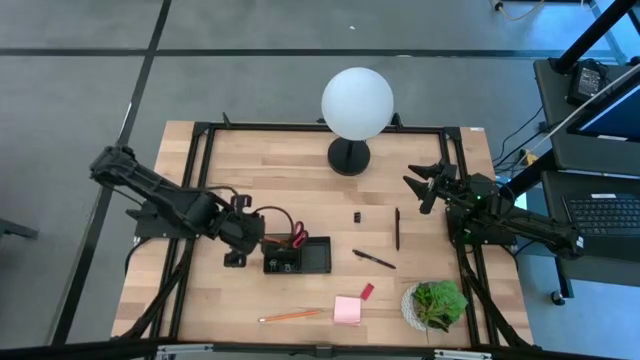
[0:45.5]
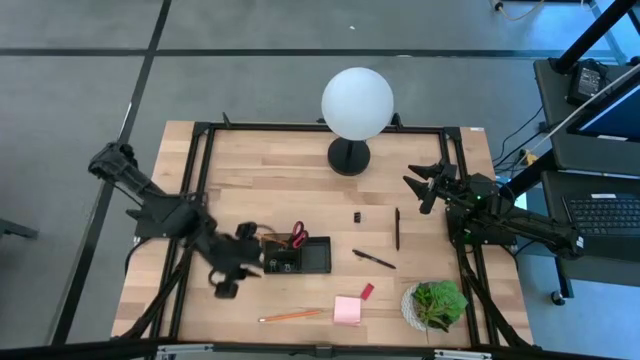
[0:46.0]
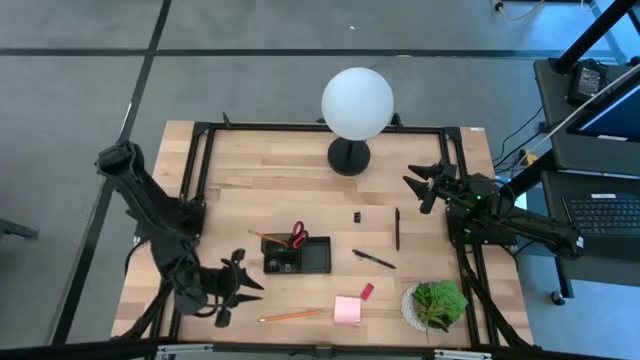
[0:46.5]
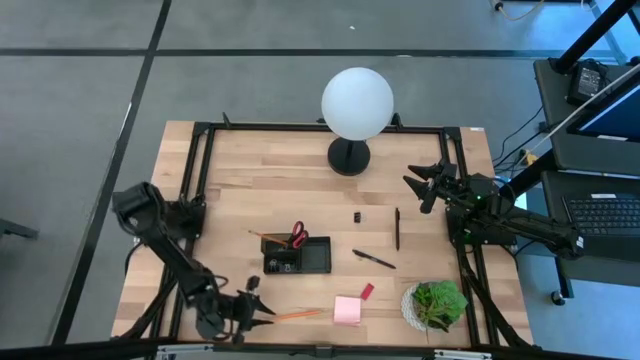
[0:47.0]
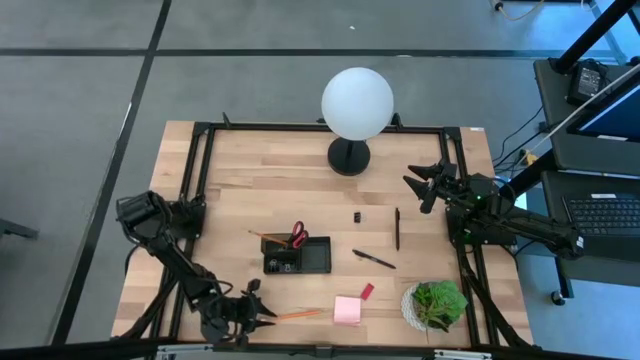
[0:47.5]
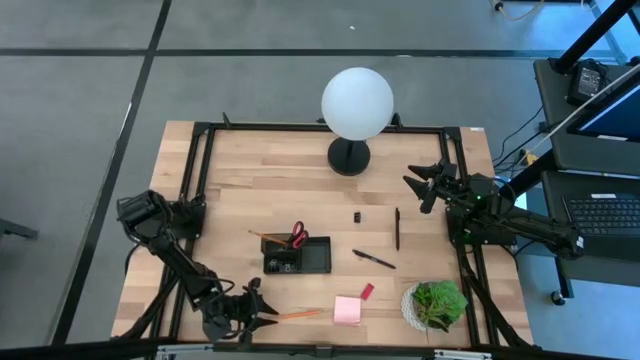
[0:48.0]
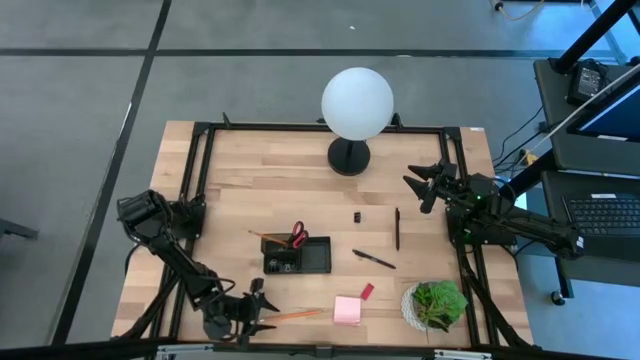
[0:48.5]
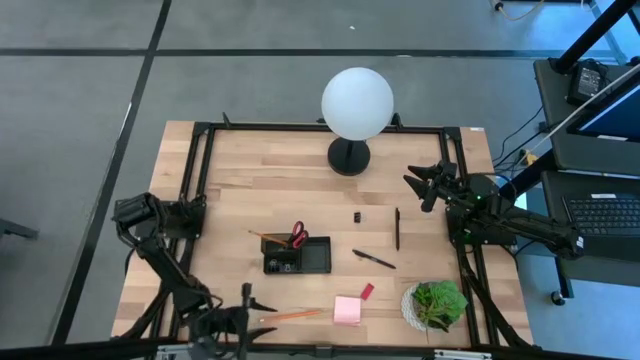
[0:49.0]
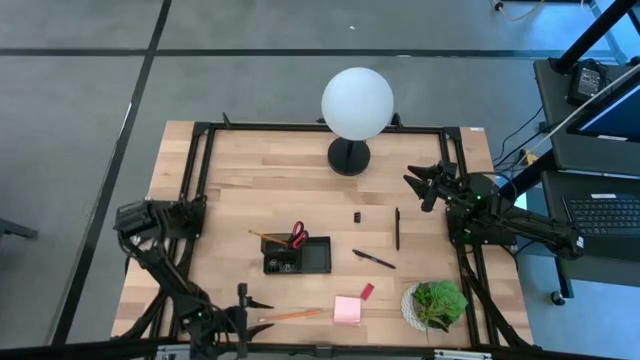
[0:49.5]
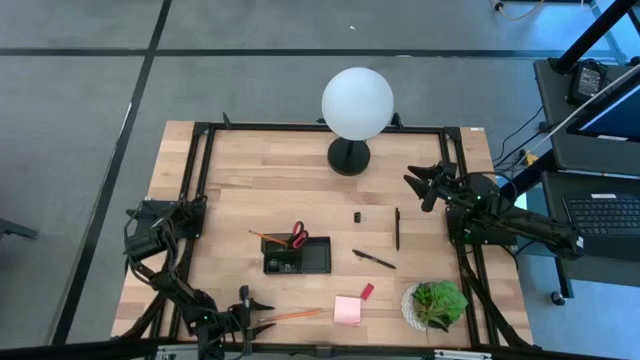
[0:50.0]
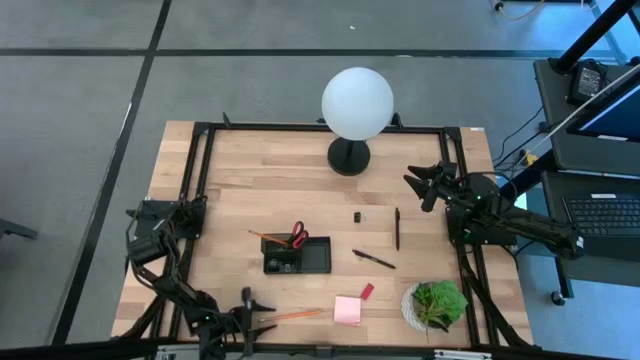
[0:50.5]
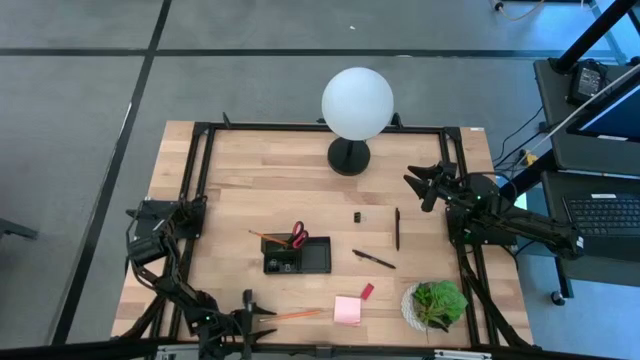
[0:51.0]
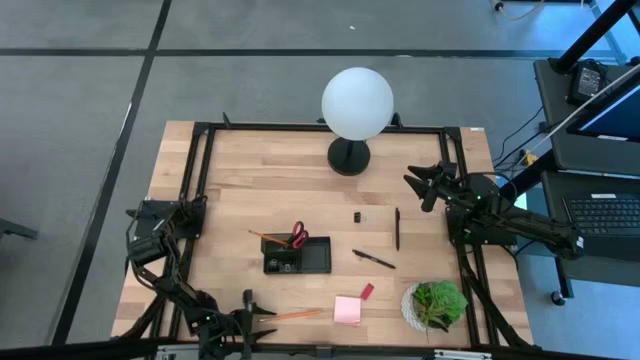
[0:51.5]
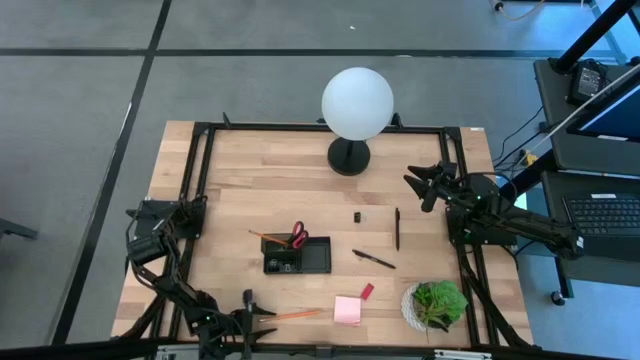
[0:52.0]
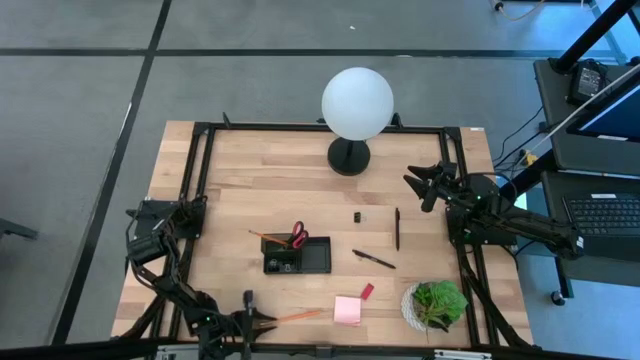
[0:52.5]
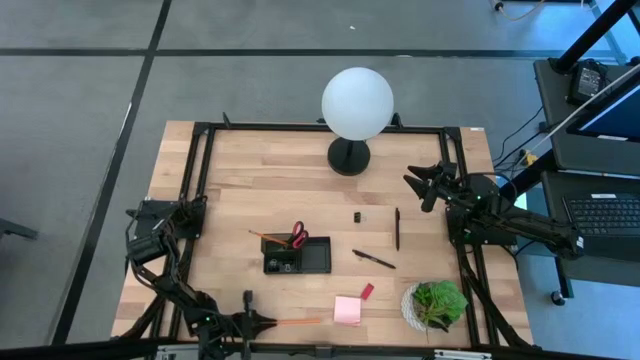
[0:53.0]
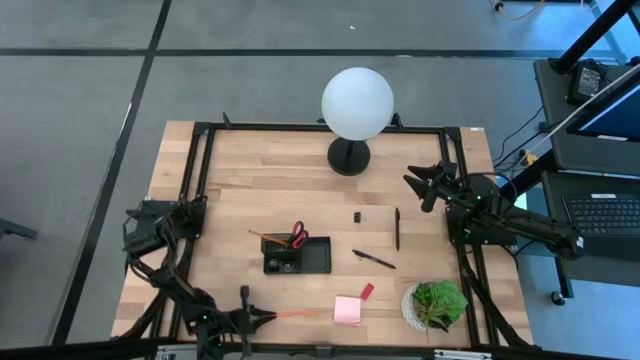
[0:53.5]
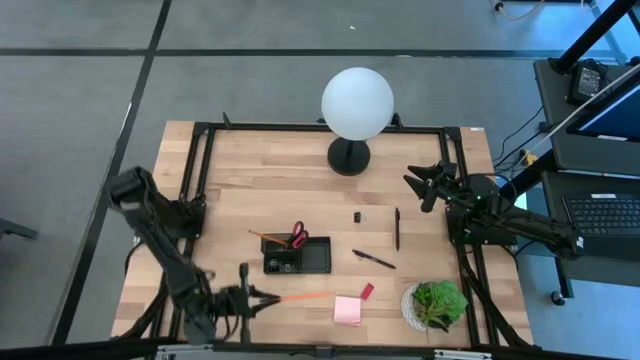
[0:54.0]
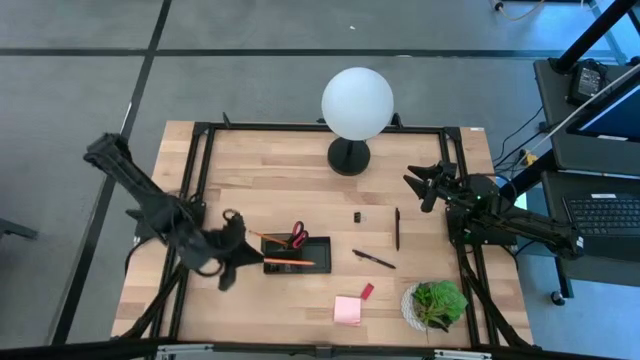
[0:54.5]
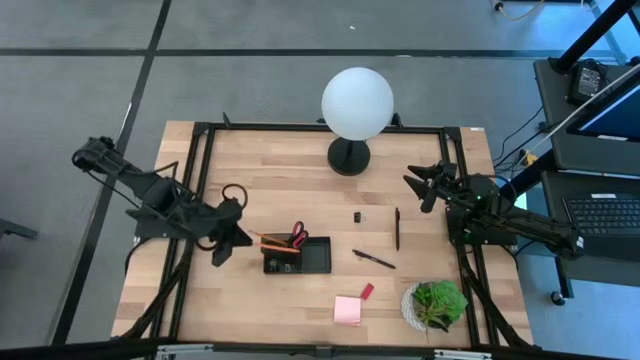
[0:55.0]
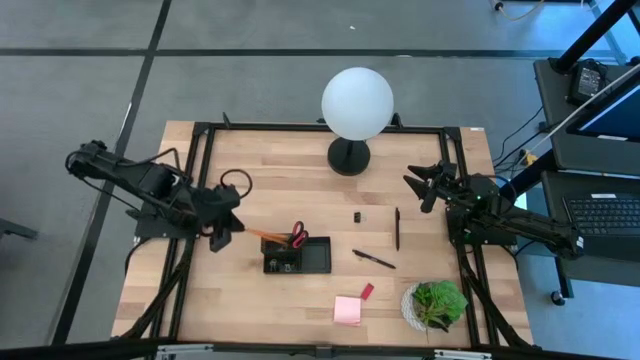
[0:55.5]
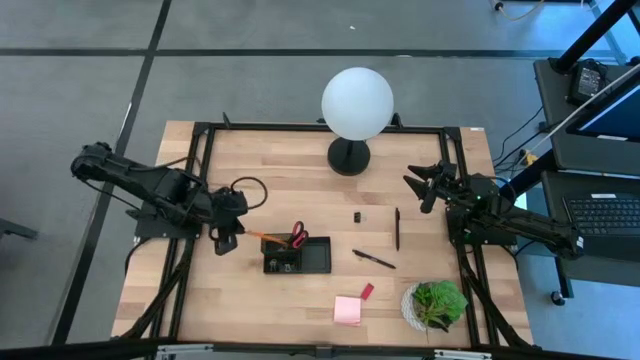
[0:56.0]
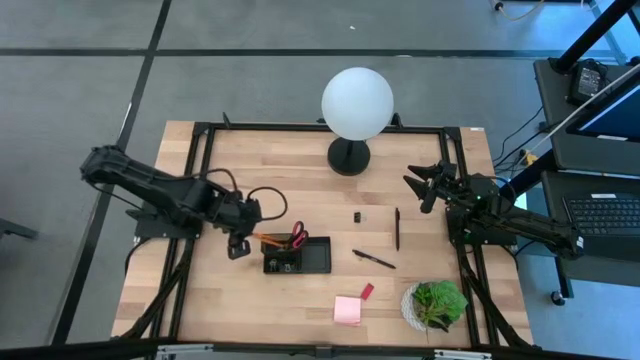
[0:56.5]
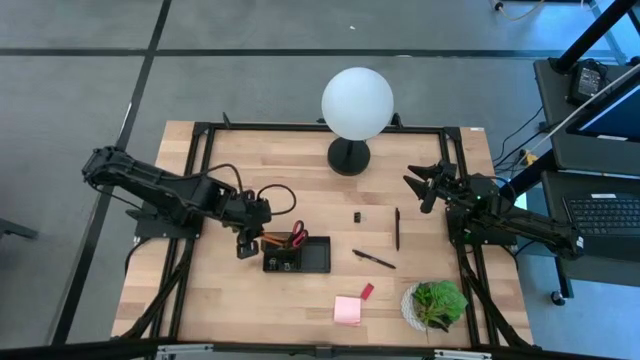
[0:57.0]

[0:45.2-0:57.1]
Task: Pick and place office supplies into organizer
Put the orange pencil into the black desk organizer

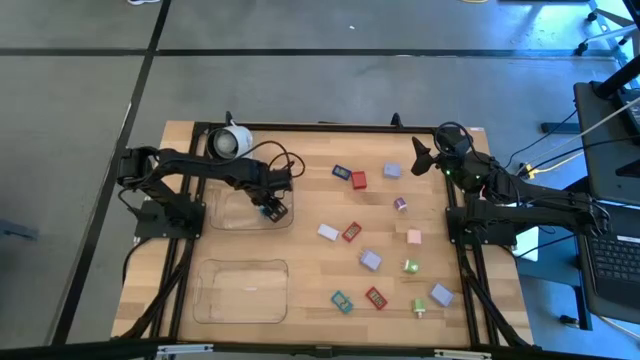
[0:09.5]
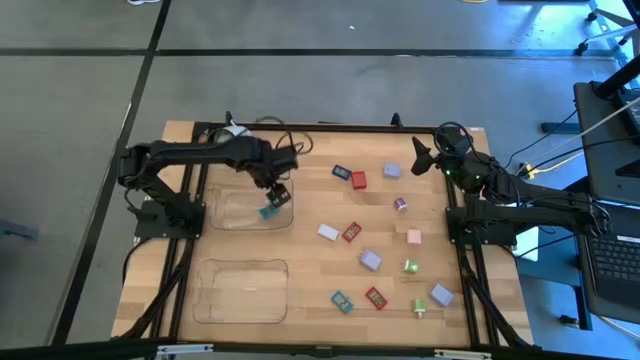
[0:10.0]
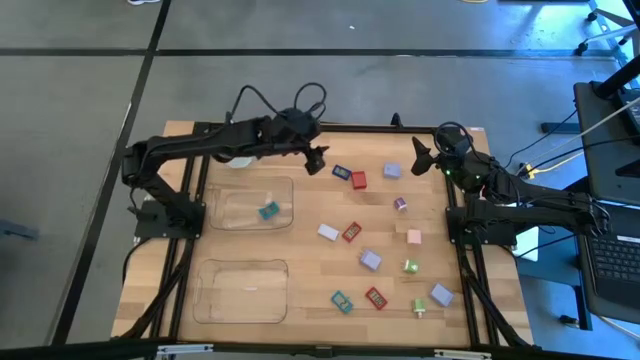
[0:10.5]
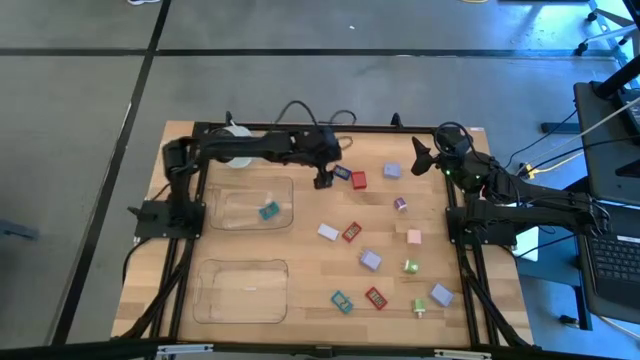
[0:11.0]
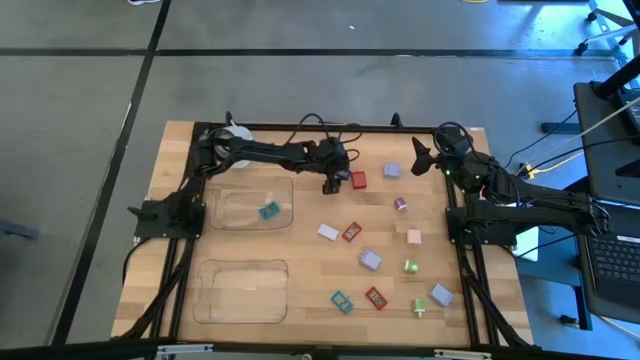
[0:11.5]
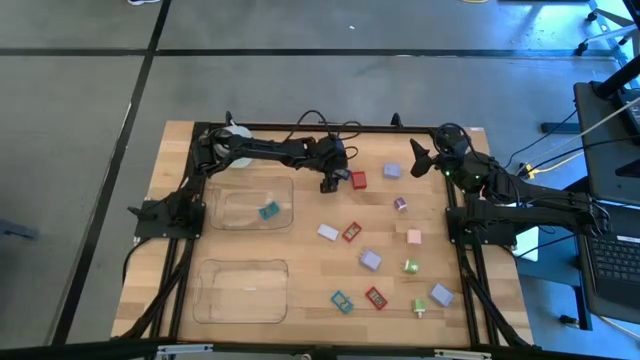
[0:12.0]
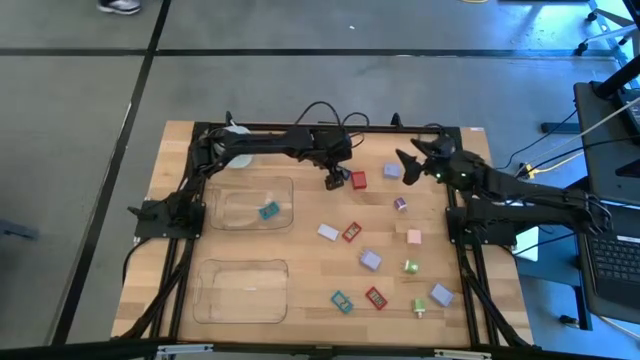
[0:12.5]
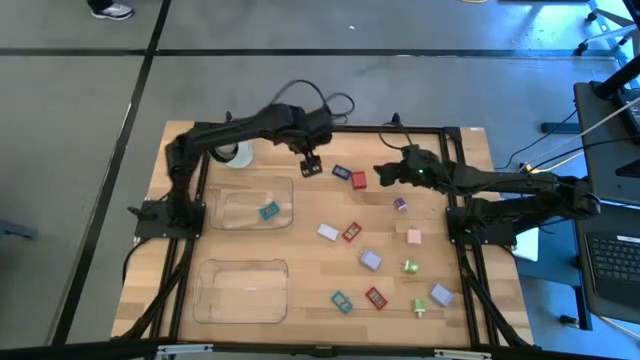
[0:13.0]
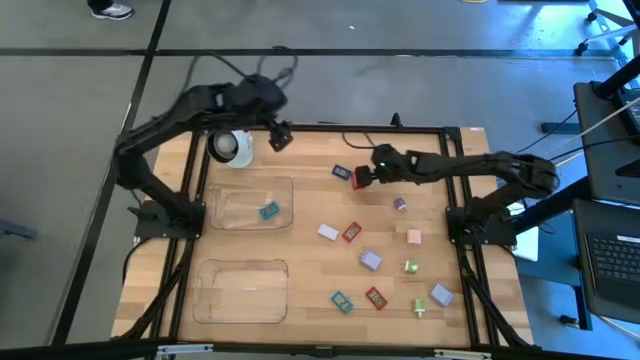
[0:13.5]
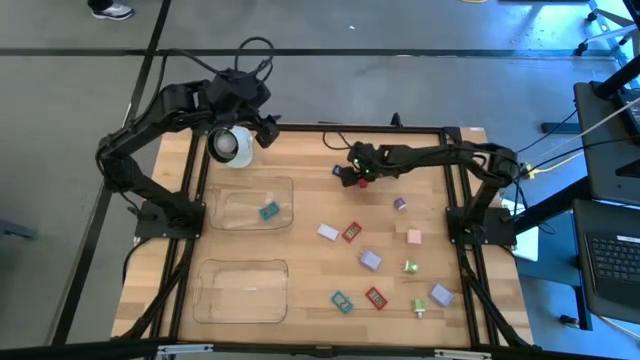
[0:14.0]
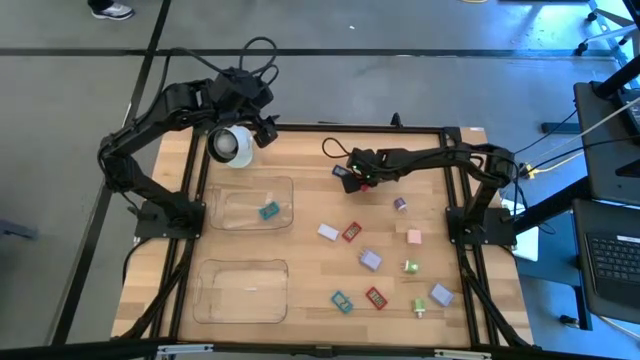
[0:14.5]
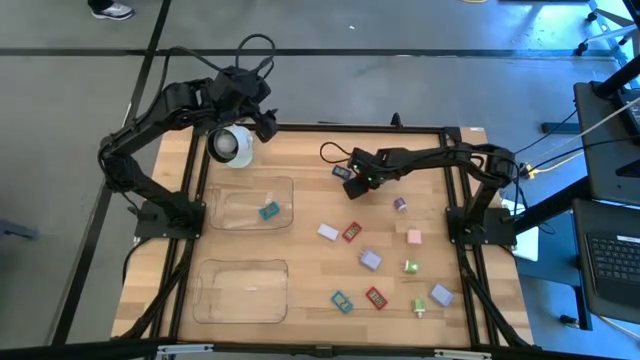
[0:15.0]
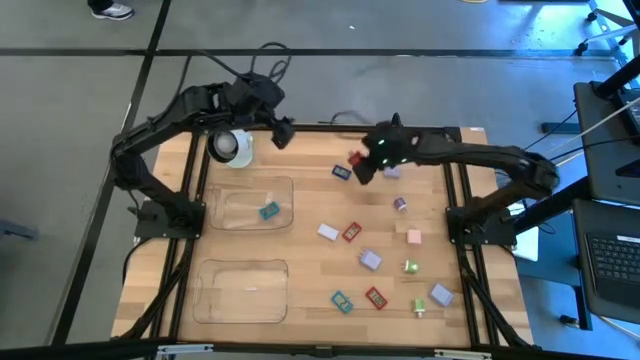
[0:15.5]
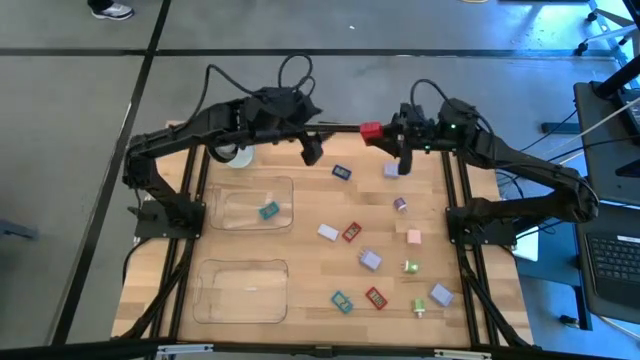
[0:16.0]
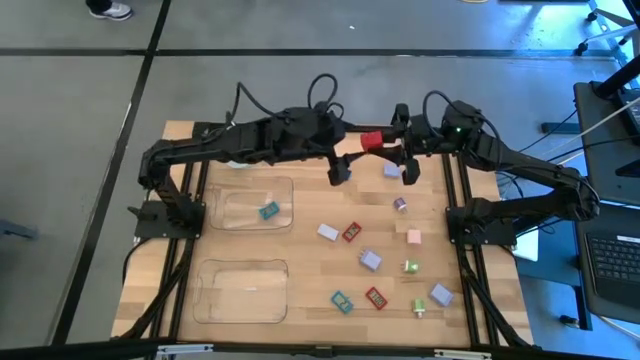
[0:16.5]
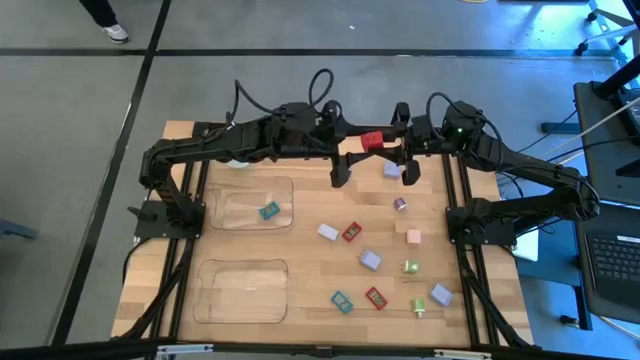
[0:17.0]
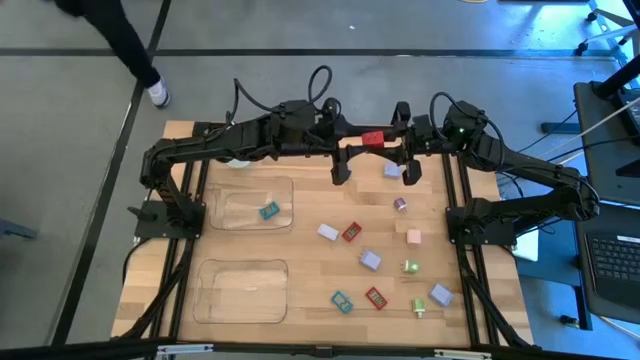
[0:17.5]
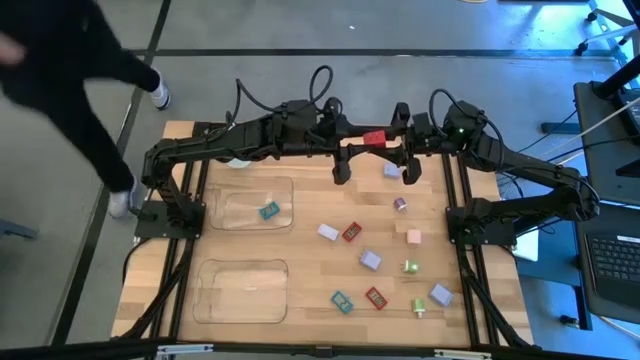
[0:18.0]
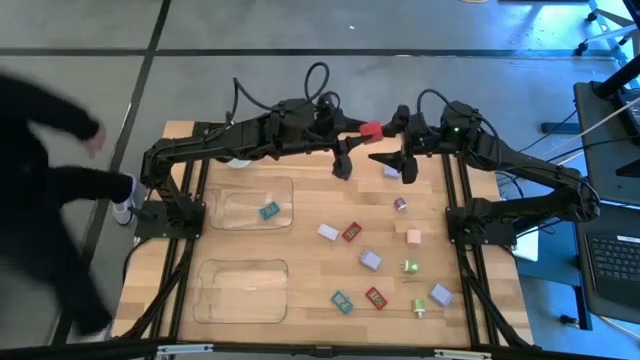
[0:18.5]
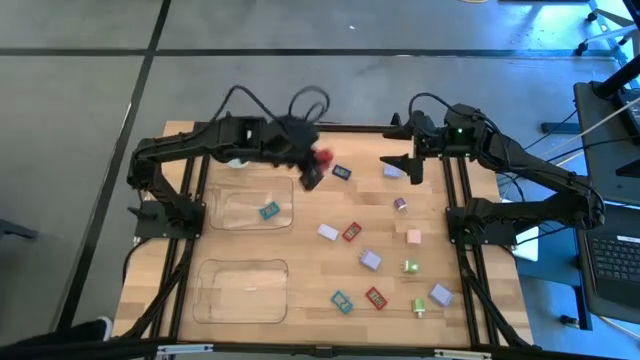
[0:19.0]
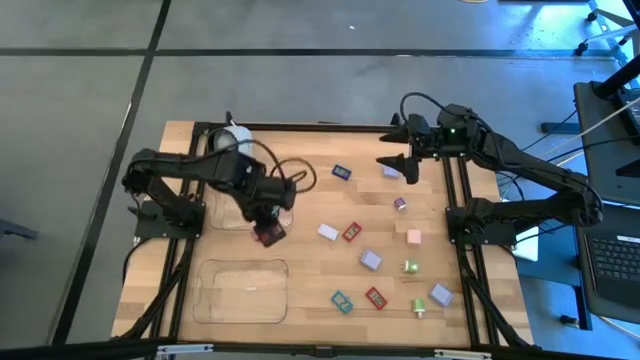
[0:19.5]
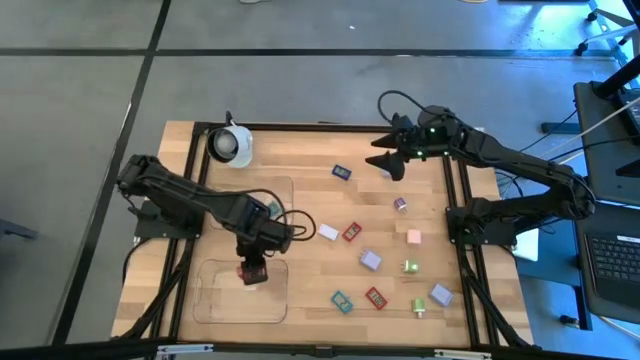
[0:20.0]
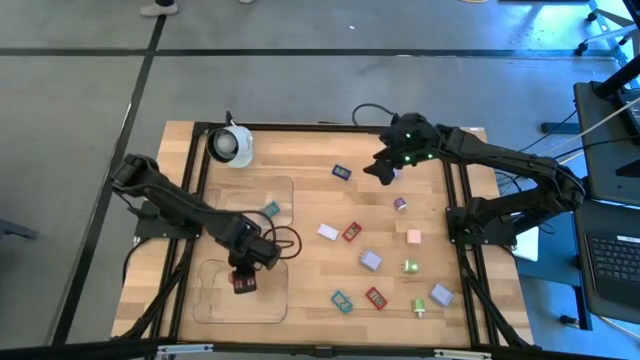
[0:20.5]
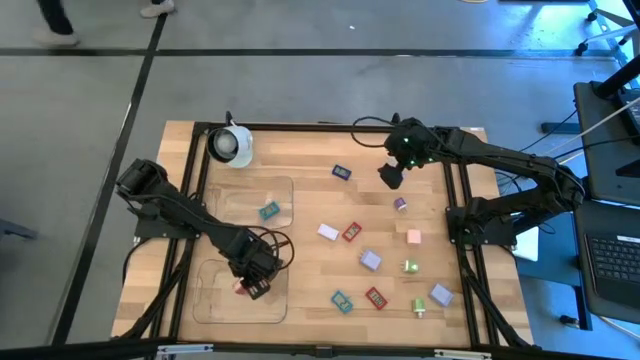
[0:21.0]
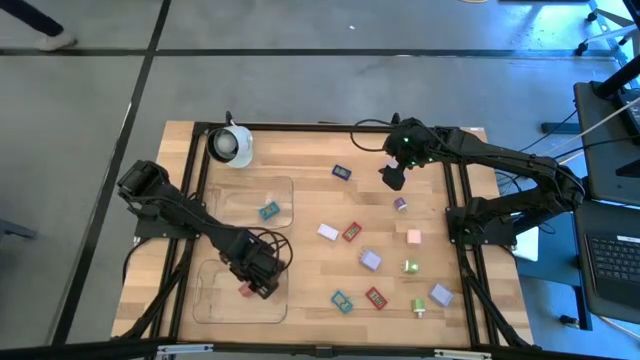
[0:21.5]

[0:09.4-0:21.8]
Task: Pick & Place Office items
Put the red charger adapter into the bottom transparent bin
